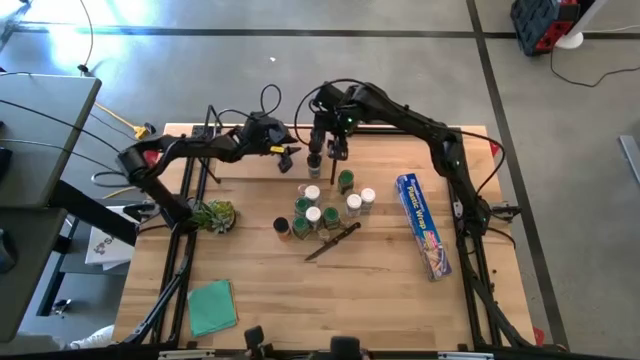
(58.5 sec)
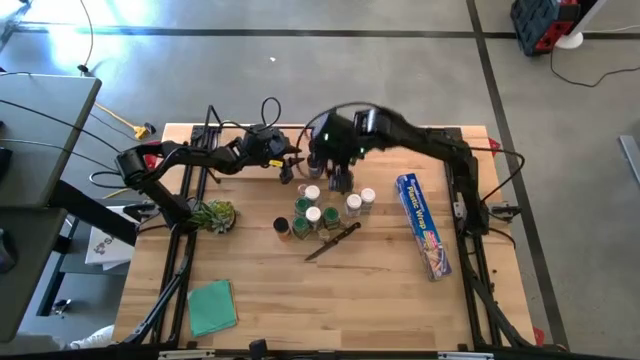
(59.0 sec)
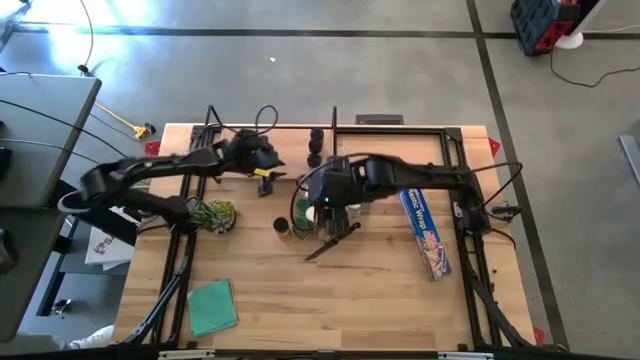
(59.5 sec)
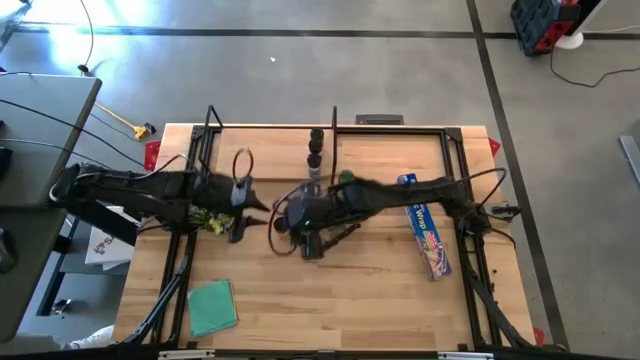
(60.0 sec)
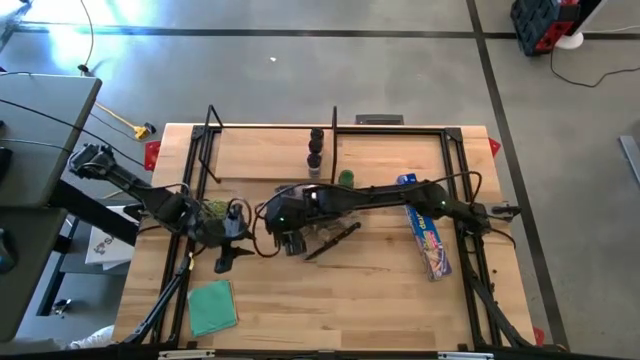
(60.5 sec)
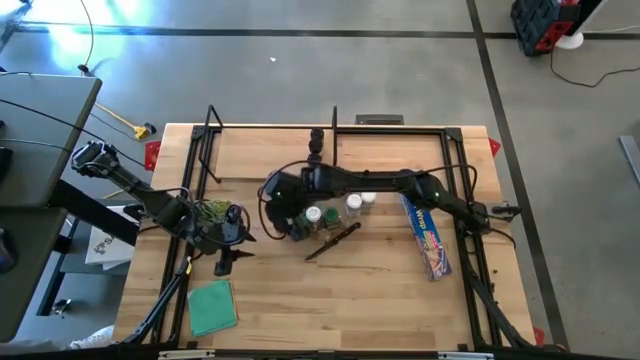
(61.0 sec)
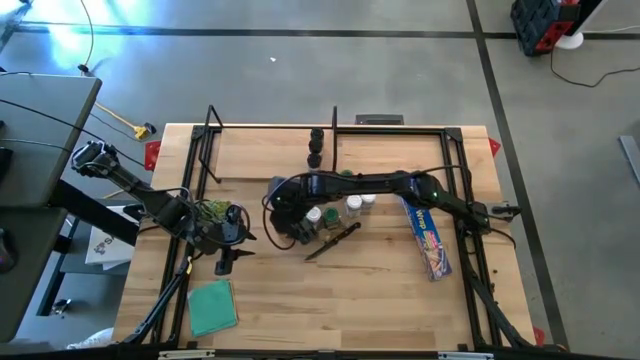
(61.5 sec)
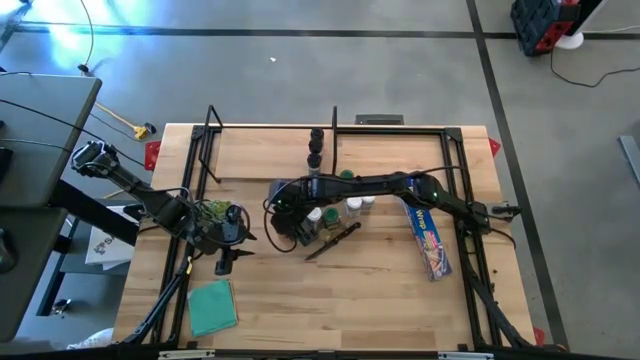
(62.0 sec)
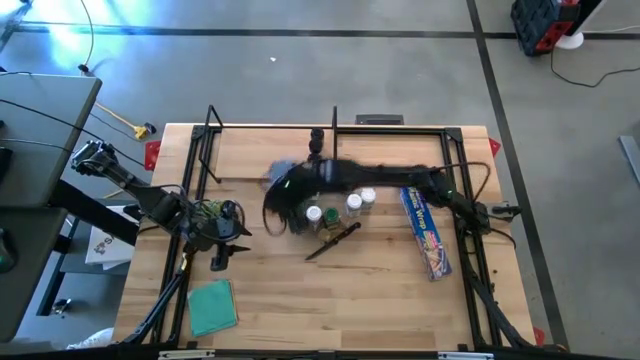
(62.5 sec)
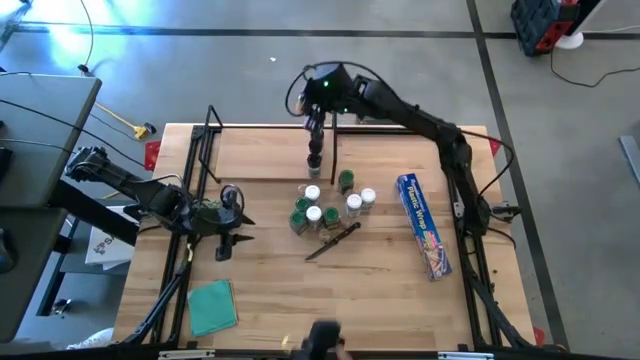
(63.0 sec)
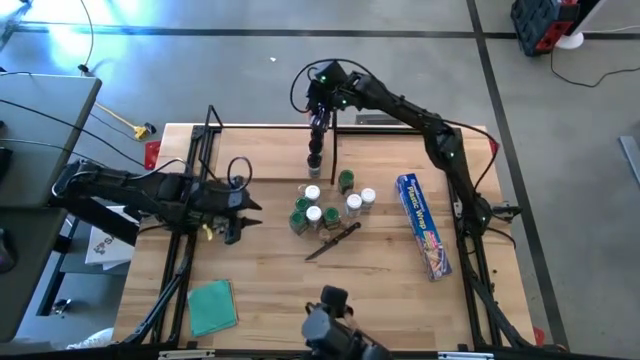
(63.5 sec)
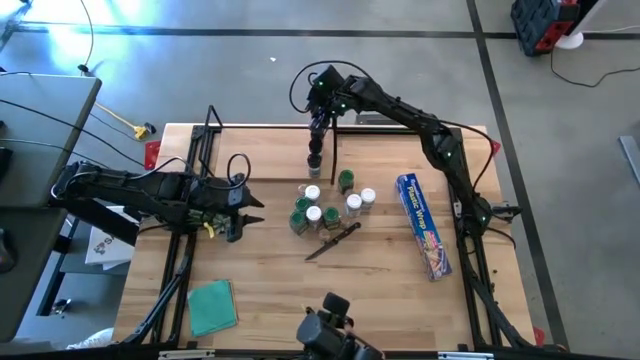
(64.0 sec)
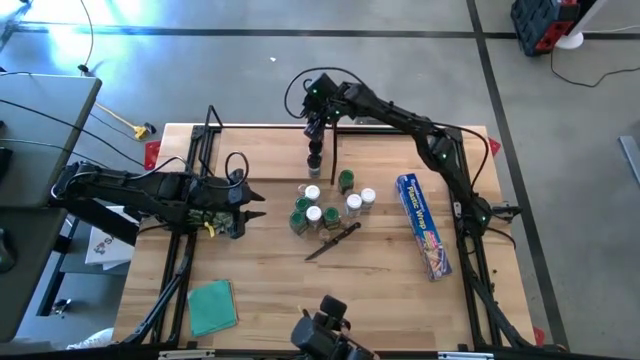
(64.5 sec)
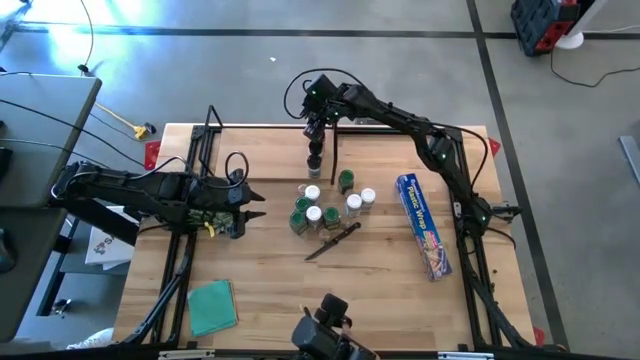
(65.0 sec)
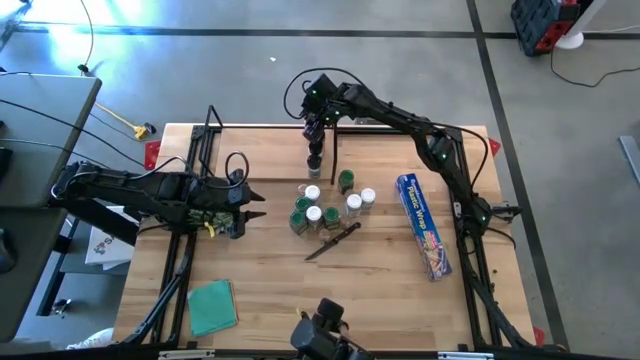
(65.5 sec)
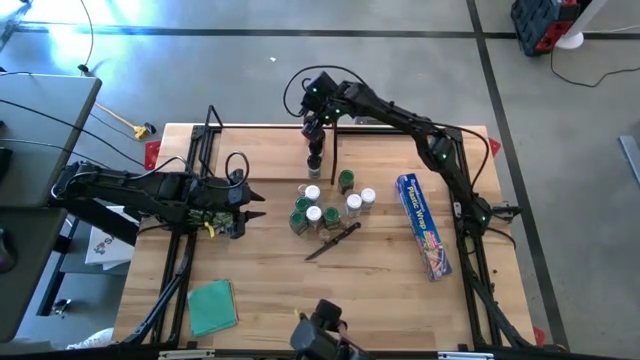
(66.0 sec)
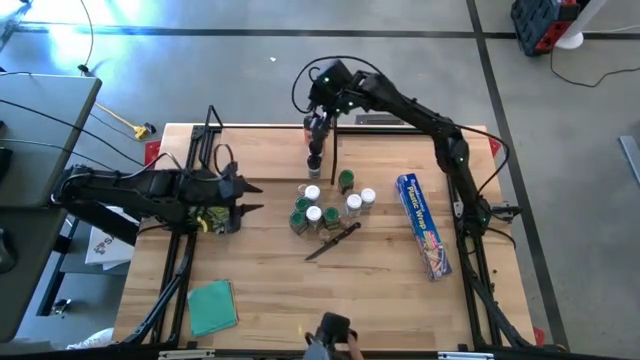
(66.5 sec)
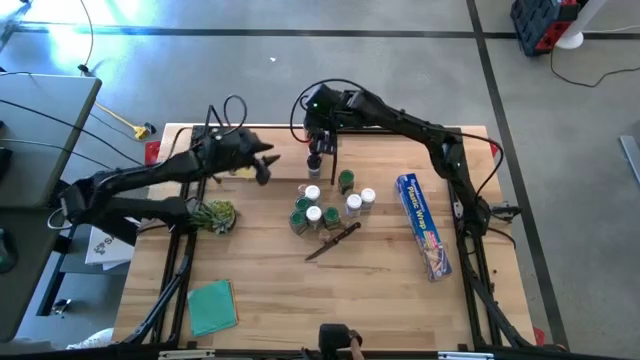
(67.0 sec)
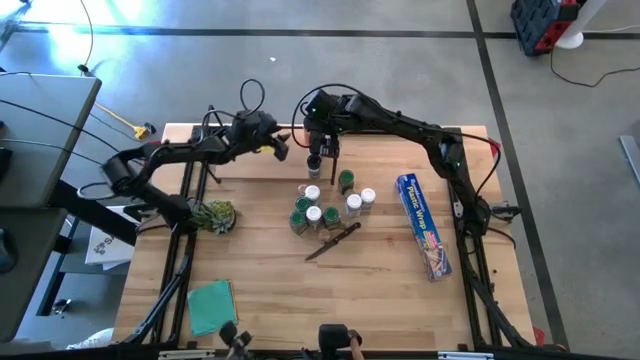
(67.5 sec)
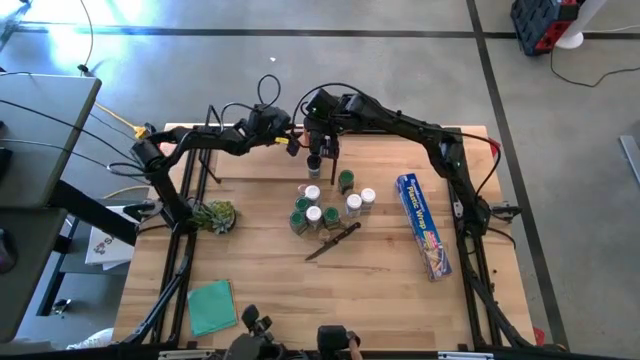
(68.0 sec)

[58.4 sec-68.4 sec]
Task: Shelf spices
Put the black lid seasoning bottle on the shelf

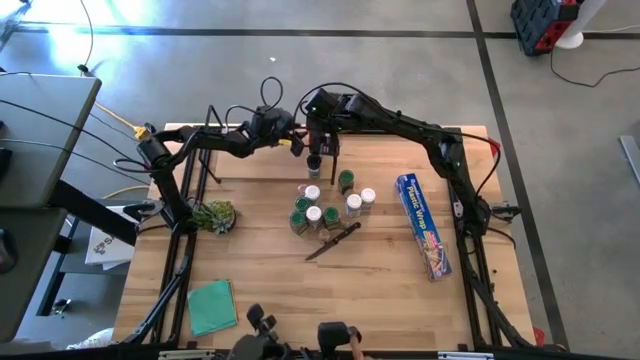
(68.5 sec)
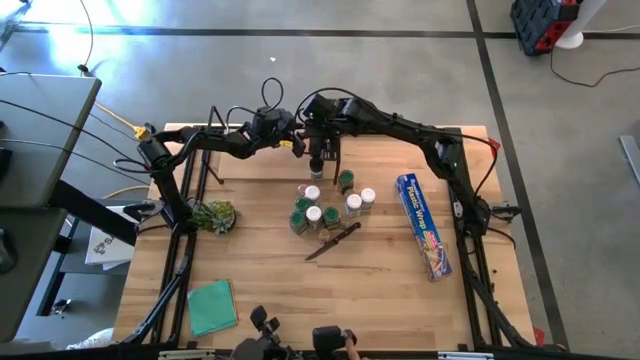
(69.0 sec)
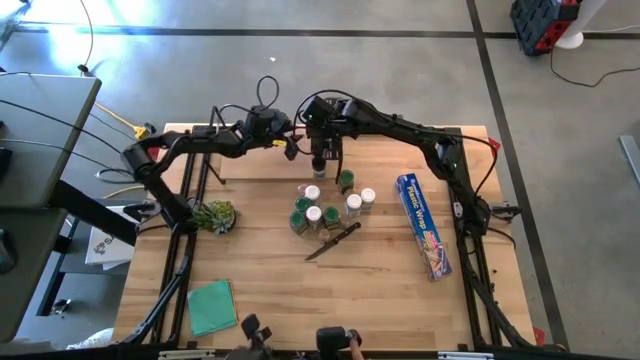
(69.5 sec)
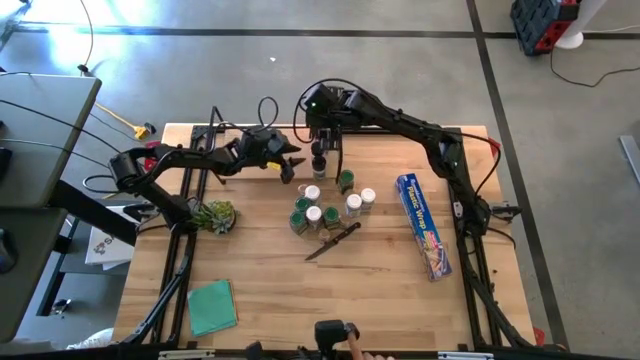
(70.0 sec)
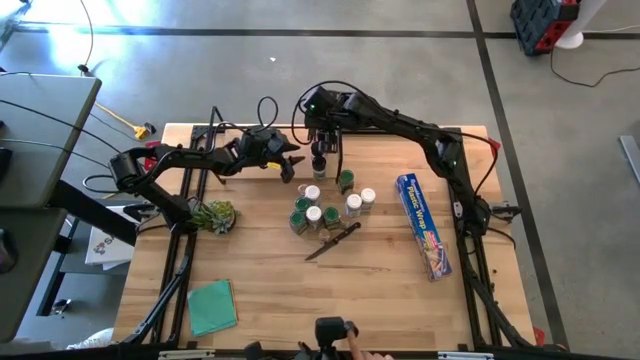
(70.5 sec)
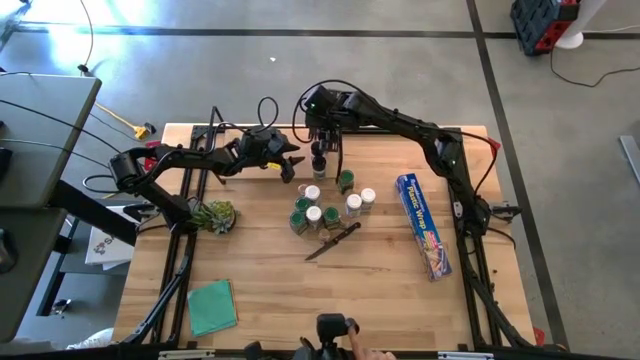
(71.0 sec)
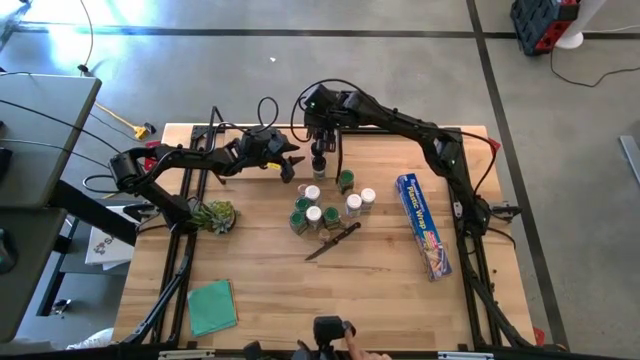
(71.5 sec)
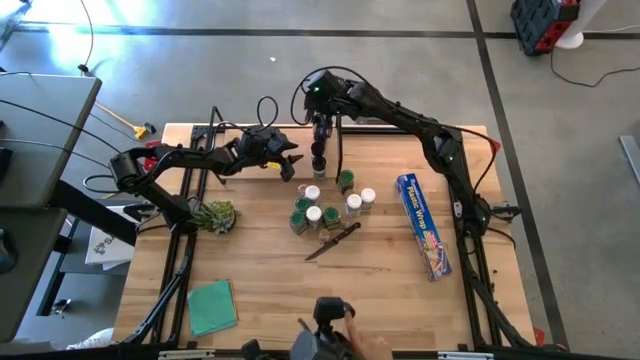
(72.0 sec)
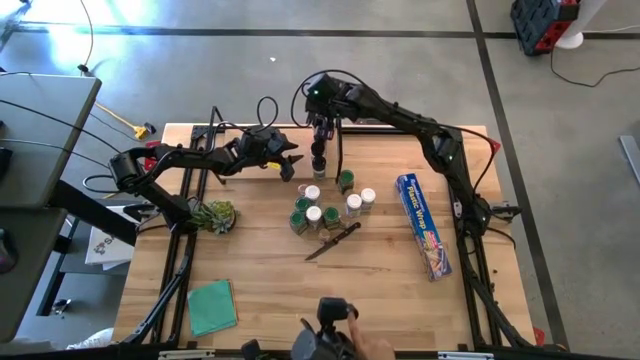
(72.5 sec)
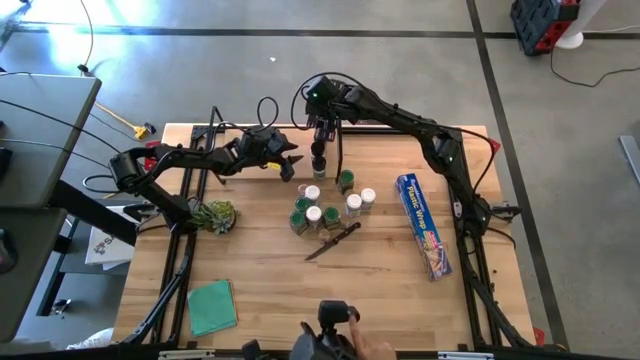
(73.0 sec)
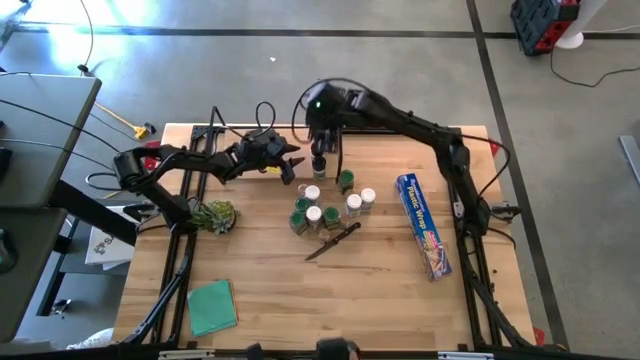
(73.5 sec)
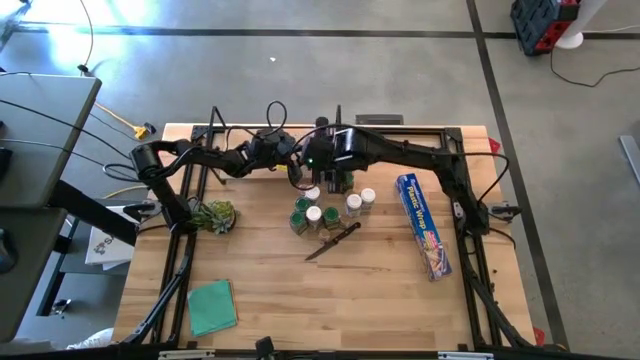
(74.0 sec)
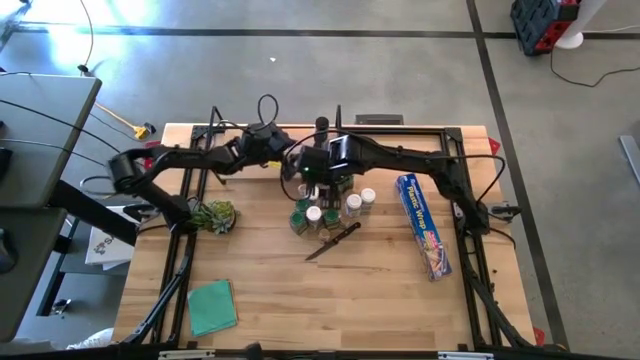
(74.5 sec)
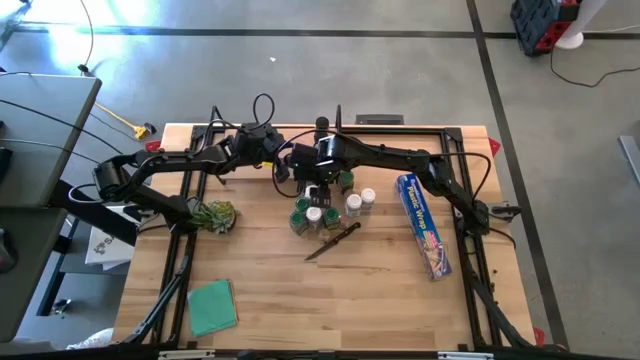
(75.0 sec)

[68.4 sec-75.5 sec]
Adjust the black lid seasoning bottles
